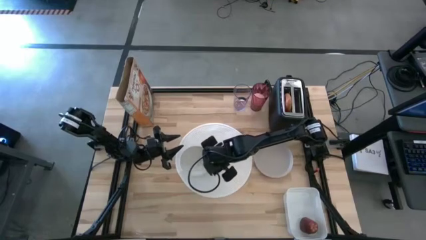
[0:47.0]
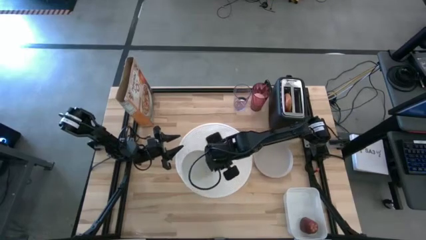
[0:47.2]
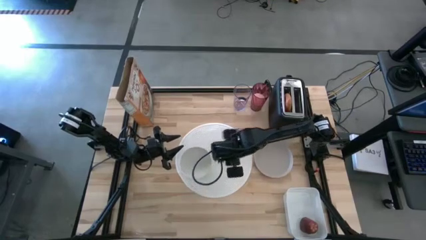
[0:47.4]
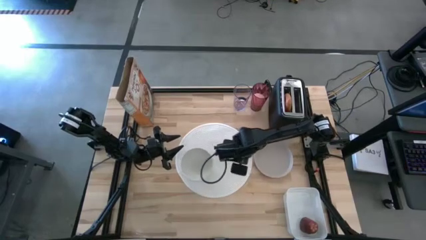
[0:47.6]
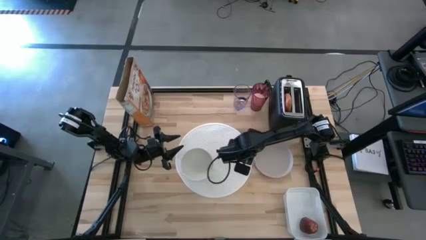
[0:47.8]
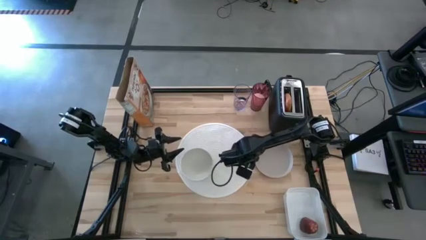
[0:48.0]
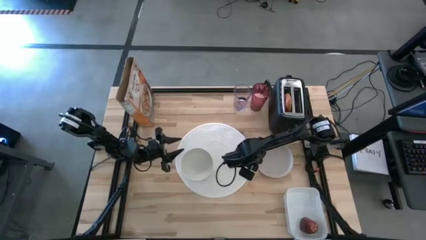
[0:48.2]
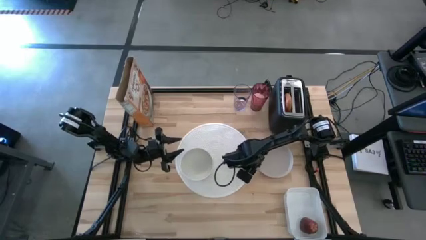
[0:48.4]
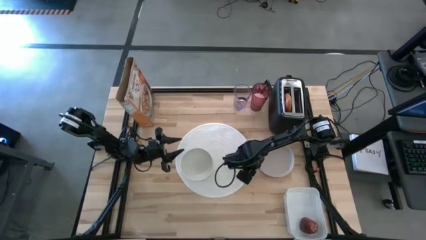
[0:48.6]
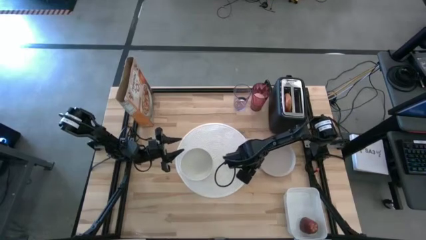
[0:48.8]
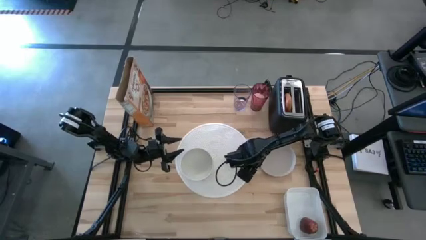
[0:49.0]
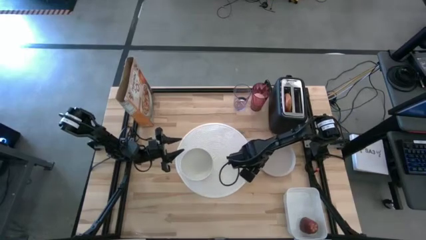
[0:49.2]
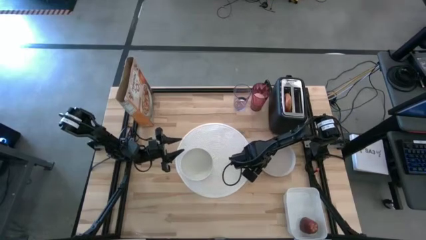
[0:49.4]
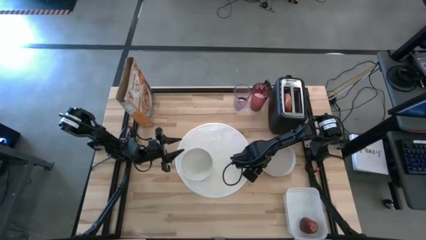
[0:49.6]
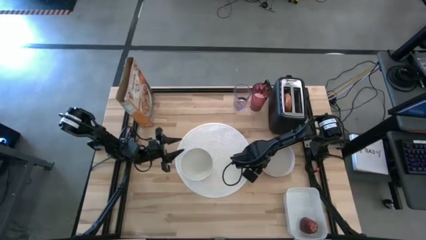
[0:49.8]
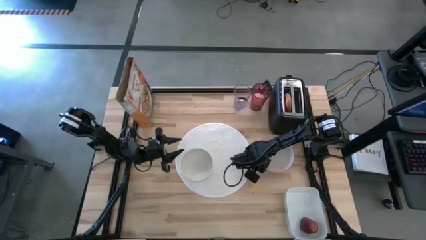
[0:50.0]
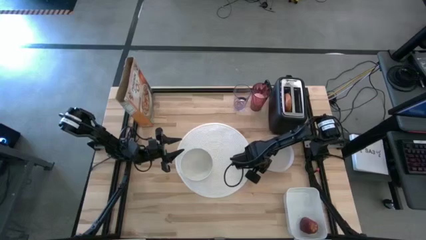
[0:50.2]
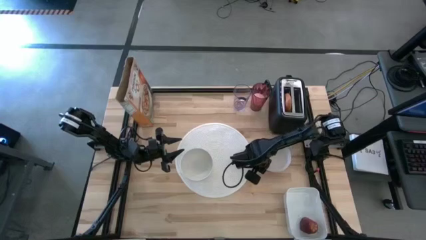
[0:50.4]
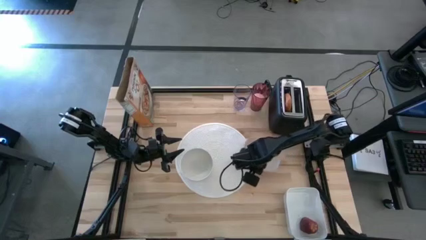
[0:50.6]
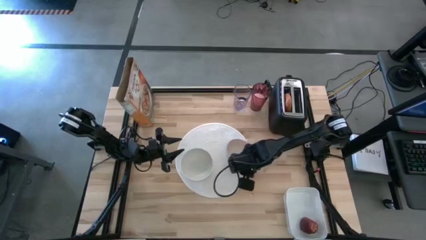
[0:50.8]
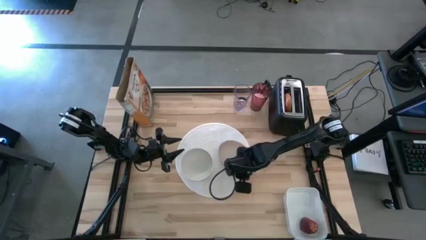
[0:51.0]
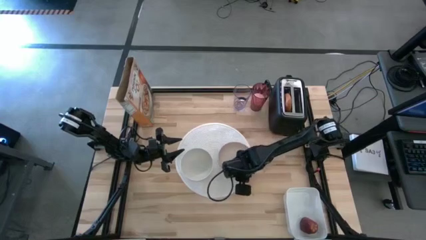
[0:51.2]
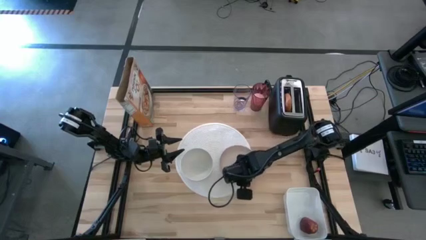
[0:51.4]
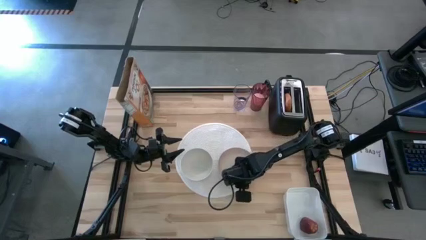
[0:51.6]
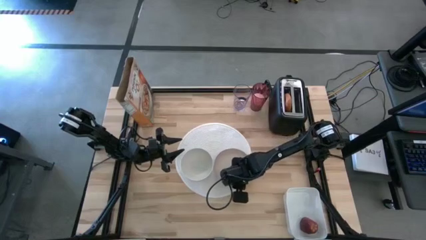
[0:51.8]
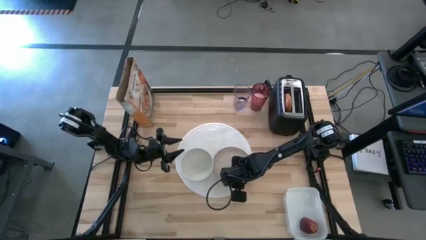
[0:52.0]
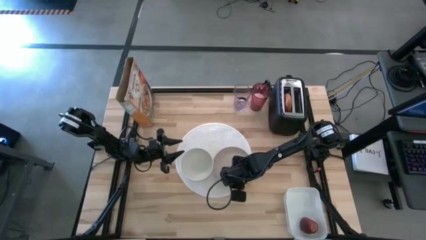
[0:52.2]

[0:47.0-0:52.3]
Task: Arrange a breakfast setting
Put the light brown plate on the white table mat to the right of the white bowl

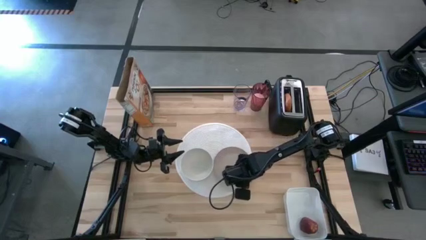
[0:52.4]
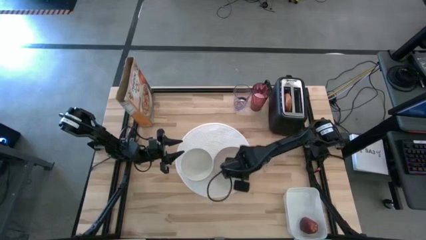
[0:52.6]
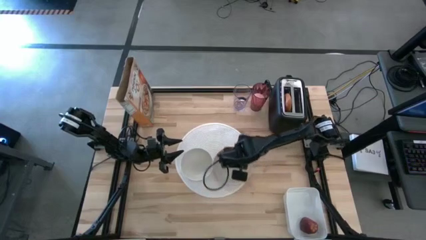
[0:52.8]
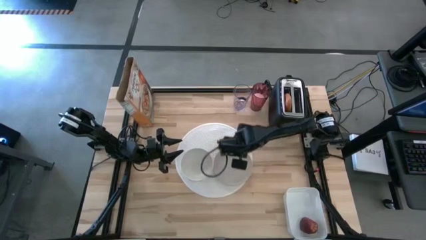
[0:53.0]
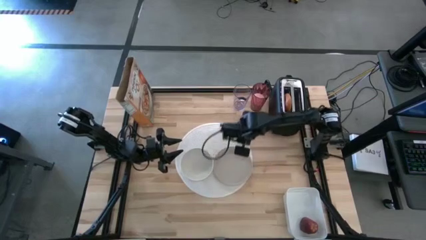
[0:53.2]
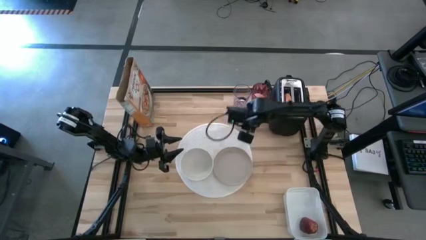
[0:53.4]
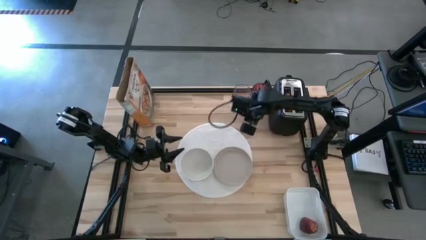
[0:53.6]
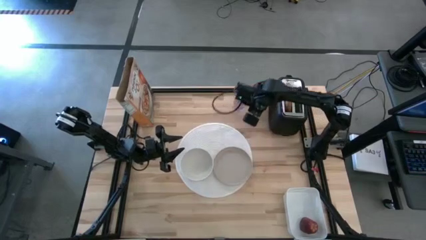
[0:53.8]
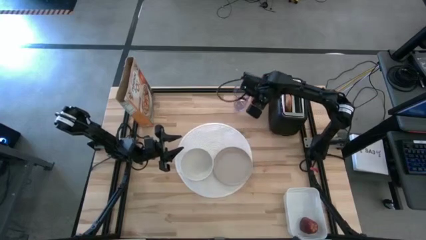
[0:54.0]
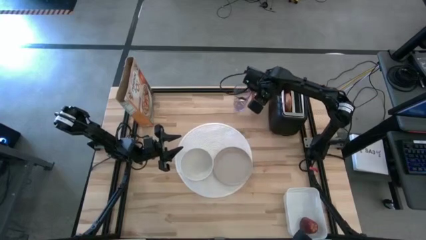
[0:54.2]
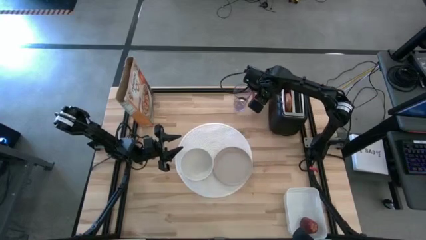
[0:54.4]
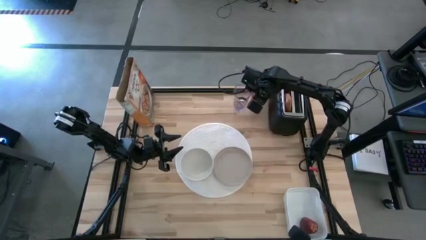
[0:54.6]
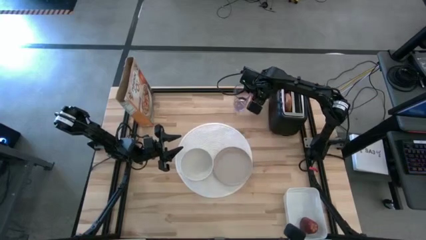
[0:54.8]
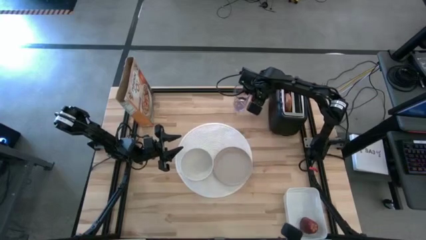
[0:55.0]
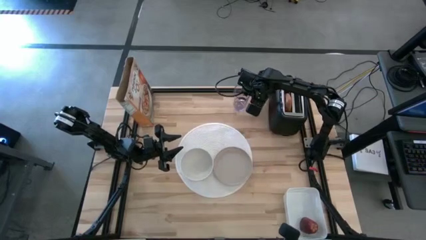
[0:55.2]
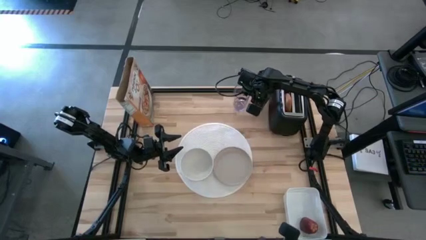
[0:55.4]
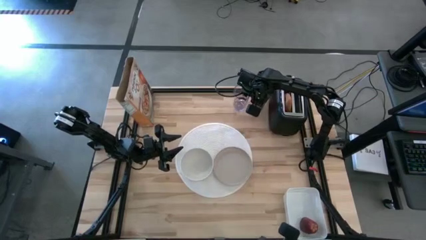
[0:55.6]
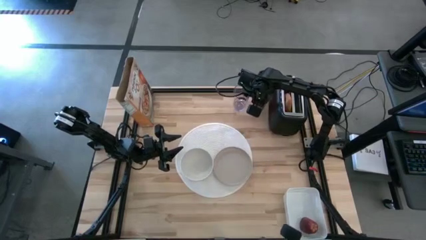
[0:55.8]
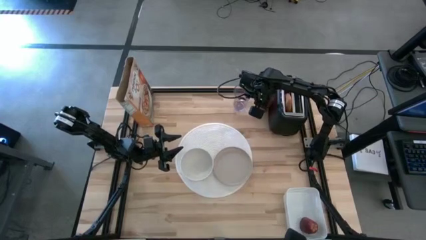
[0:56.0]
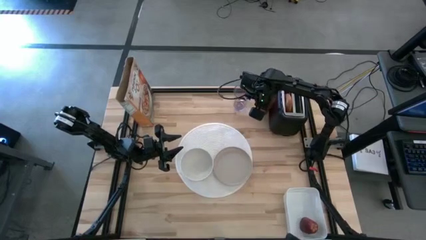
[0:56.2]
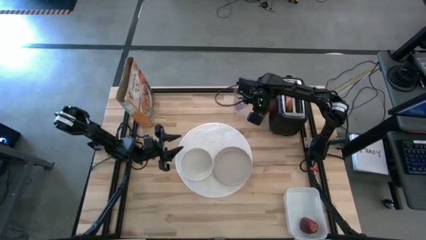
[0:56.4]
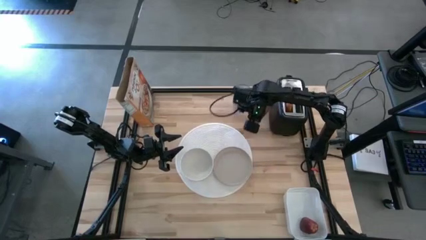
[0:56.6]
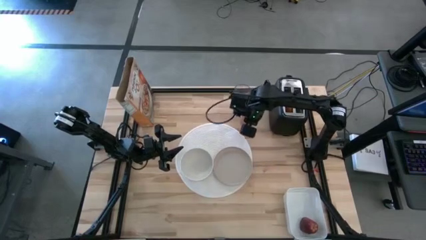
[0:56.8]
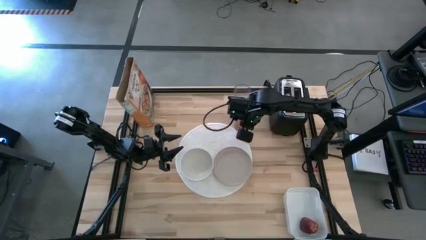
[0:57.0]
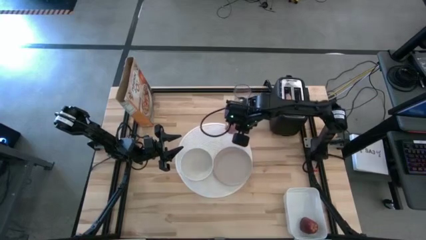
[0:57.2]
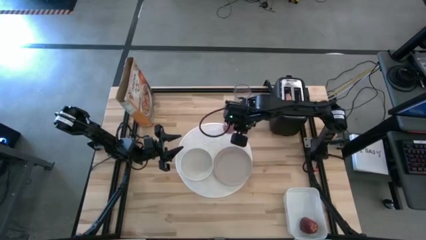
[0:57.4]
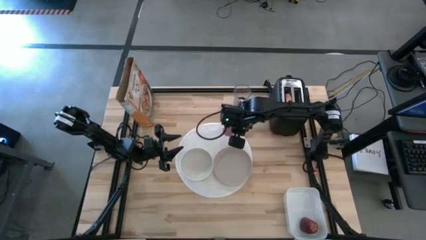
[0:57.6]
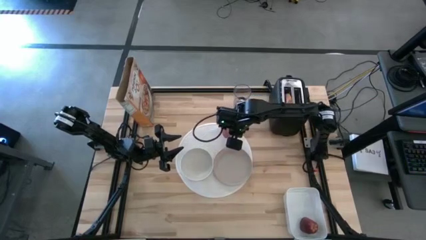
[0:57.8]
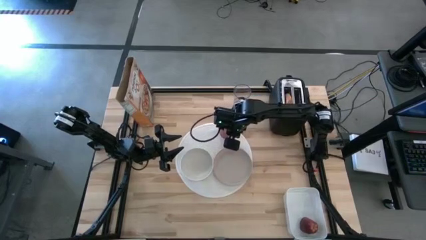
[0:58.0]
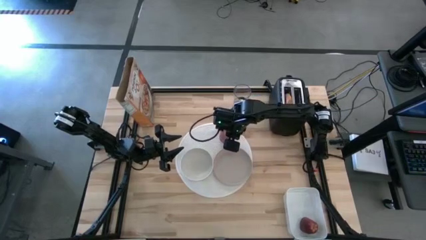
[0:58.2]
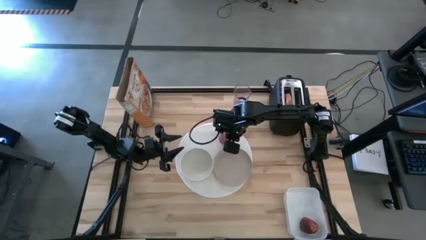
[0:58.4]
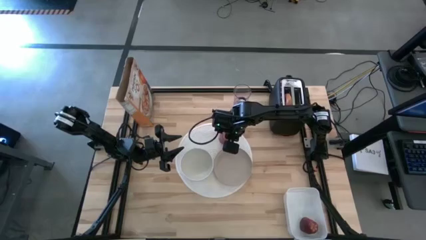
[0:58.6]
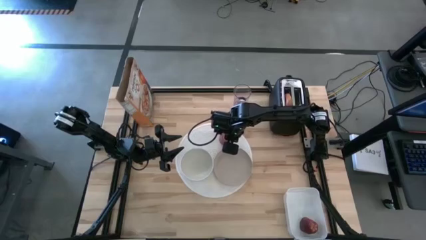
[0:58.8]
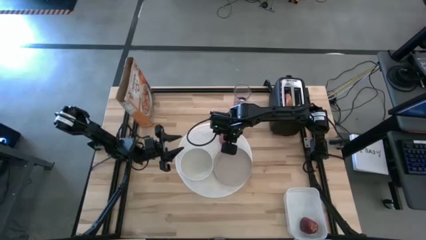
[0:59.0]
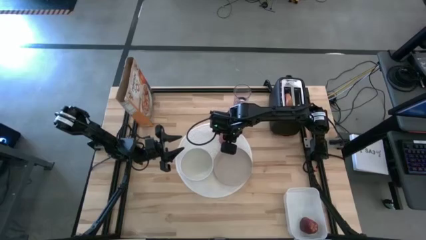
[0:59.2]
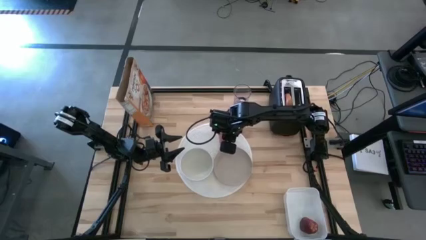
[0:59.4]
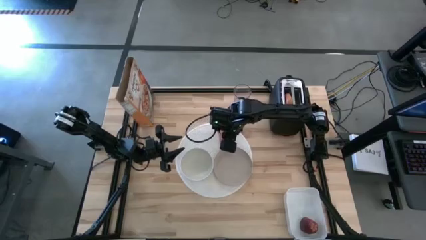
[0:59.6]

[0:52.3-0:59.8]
Put the red glass on the white table mat to the top of the light brown plate

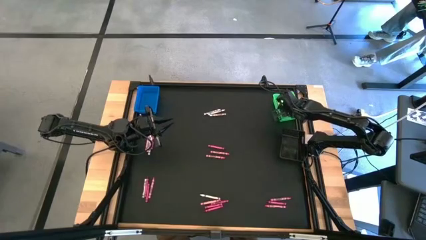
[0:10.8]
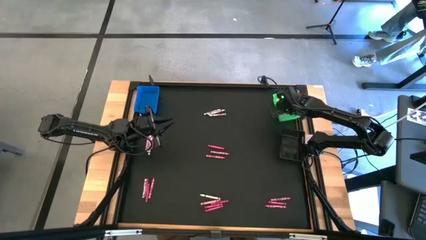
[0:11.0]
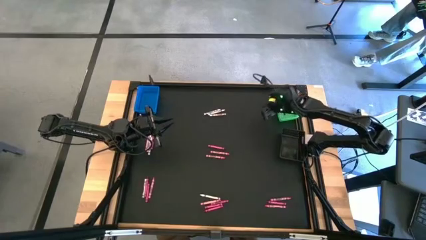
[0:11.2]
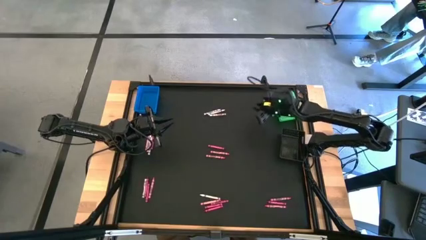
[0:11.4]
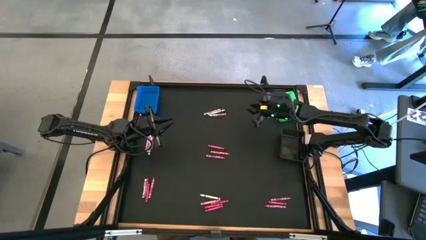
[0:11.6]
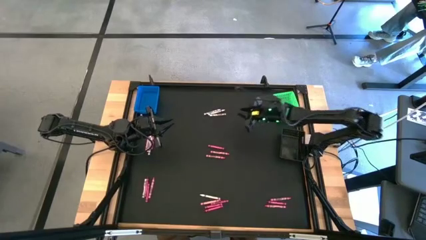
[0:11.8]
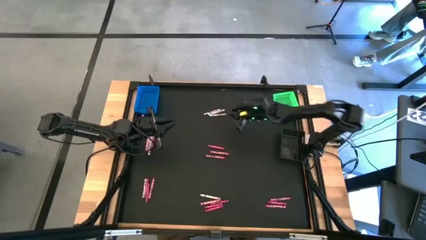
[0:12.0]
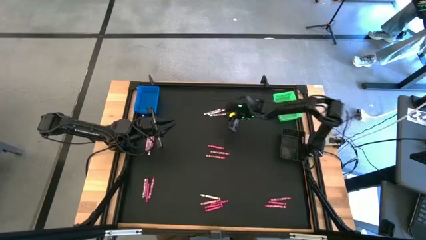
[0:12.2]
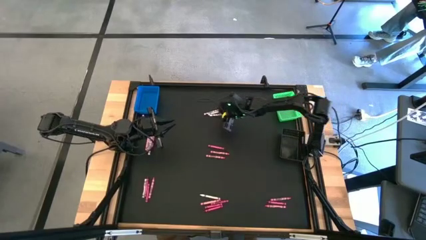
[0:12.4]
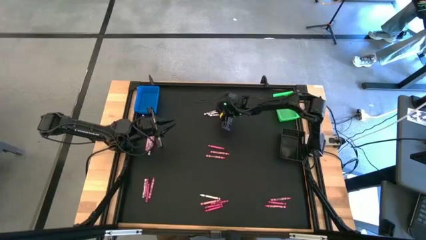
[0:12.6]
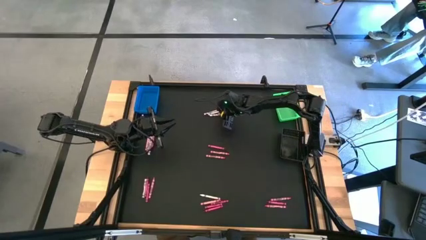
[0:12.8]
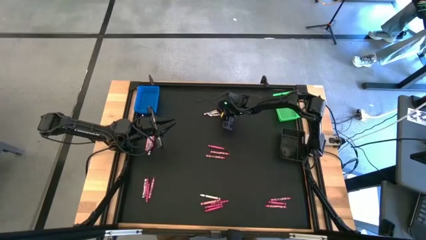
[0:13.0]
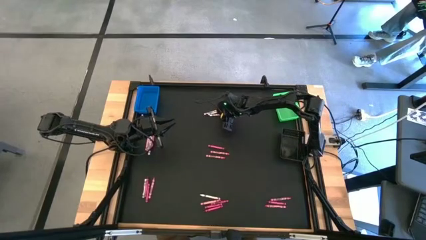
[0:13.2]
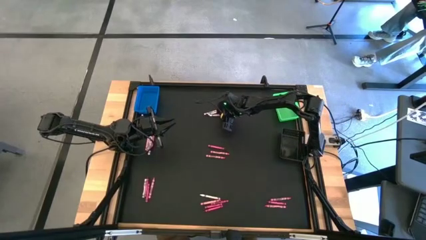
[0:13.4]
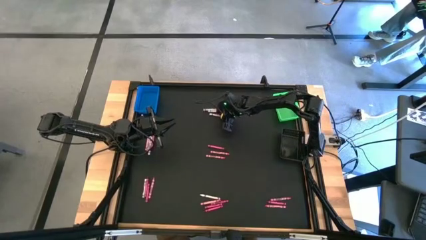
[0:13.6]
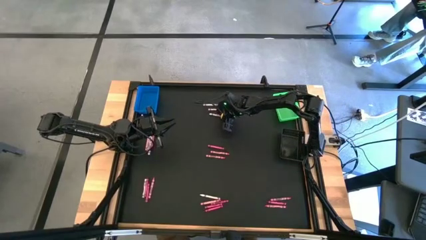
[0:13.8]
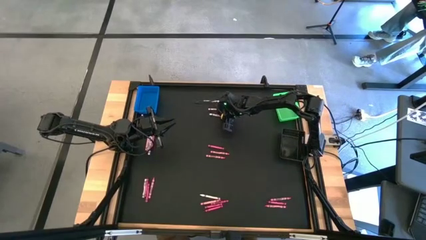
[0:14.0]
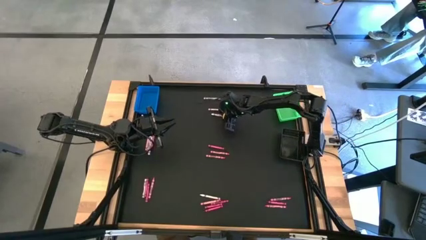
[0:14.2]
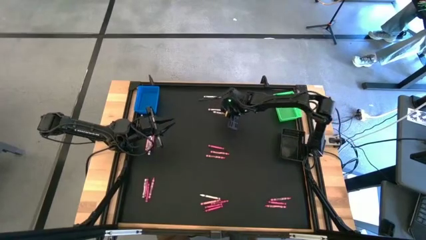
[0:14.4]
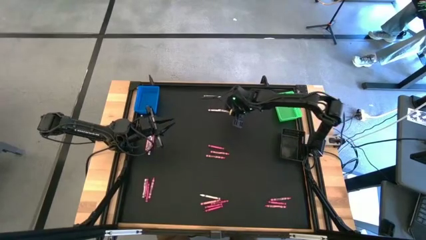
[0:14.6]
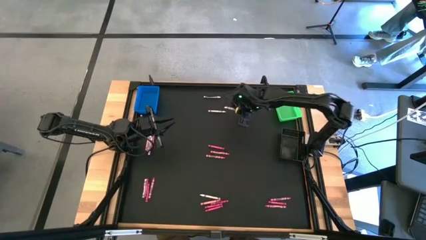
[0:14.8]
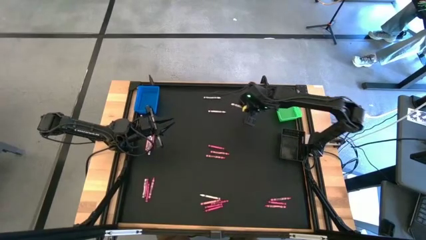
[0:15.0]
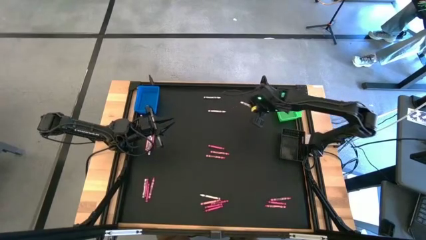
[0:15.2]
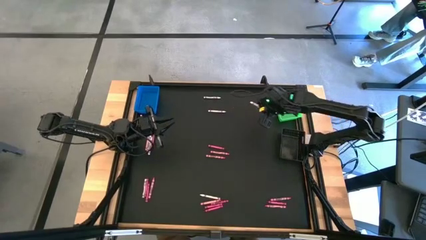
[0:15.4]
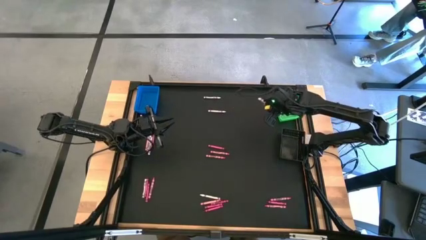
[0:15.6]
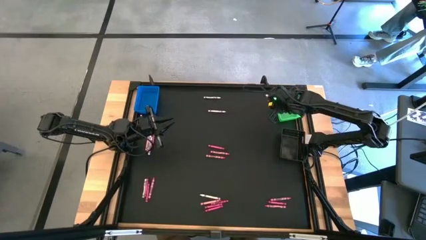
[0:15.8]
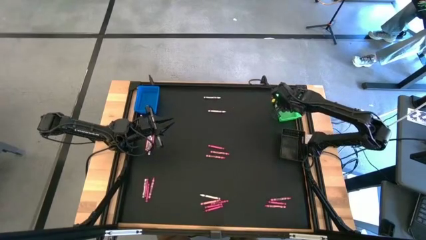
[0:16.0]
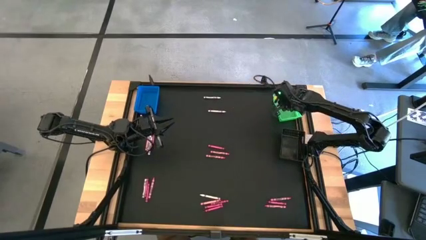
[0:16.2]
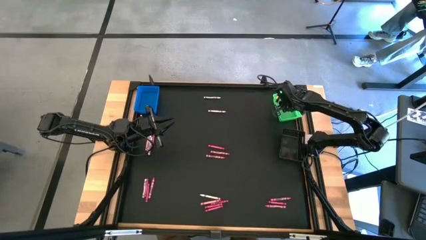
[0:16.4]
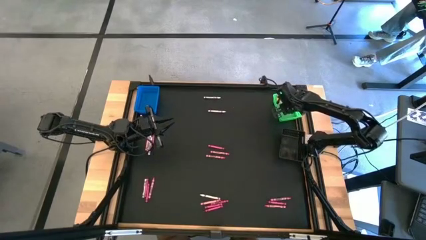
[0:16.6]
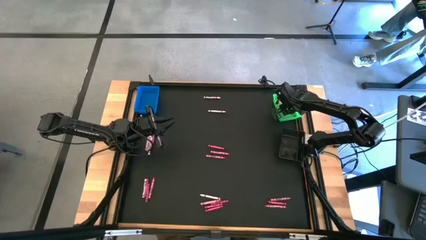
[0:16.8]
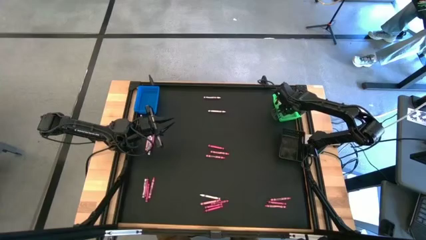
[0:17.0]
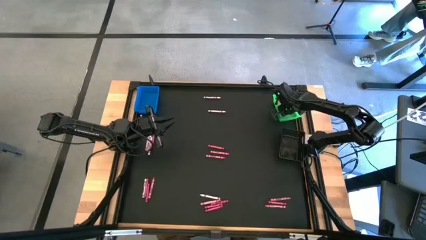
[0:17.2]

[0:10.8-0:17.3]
Task: Sort crayons
Put the white crayon into the green bin
